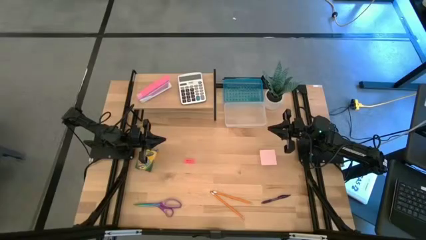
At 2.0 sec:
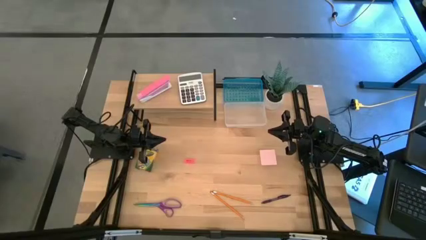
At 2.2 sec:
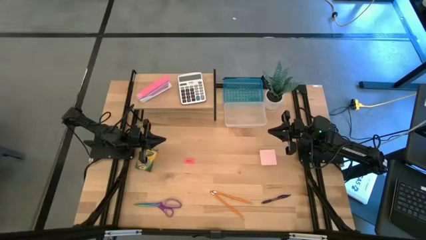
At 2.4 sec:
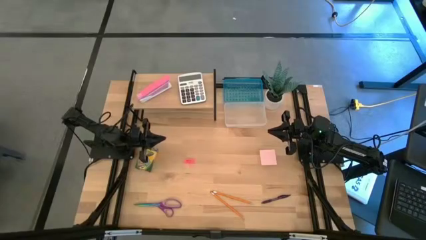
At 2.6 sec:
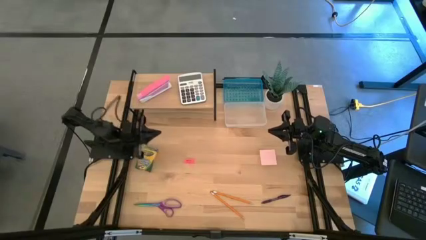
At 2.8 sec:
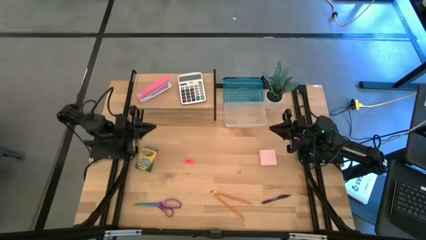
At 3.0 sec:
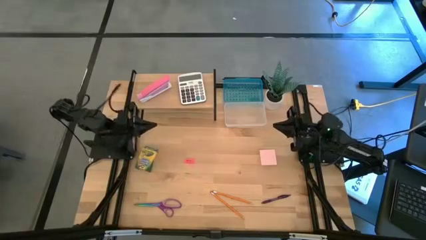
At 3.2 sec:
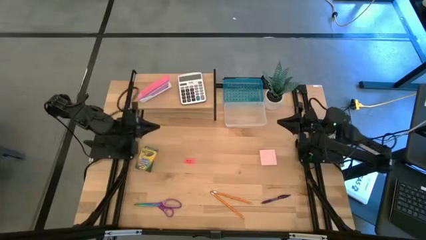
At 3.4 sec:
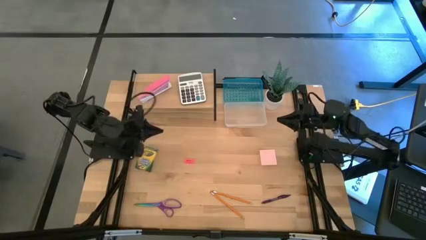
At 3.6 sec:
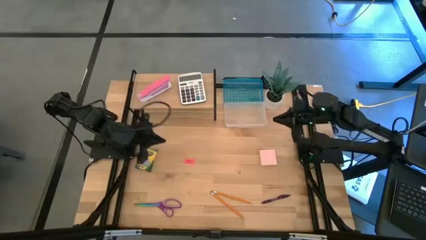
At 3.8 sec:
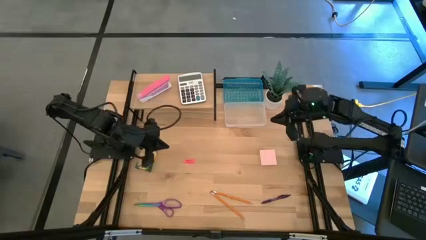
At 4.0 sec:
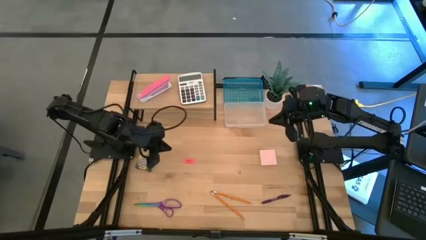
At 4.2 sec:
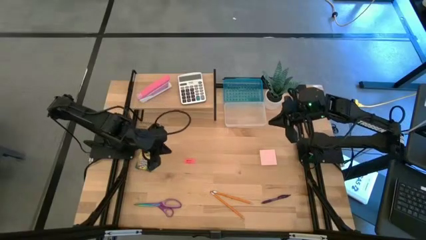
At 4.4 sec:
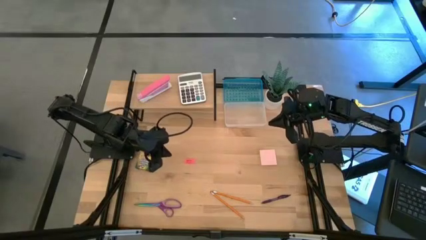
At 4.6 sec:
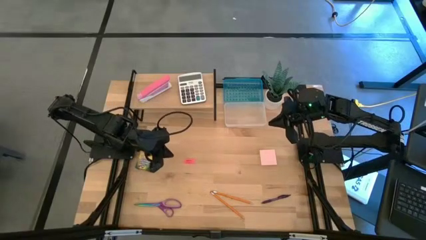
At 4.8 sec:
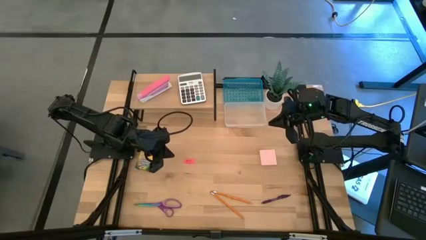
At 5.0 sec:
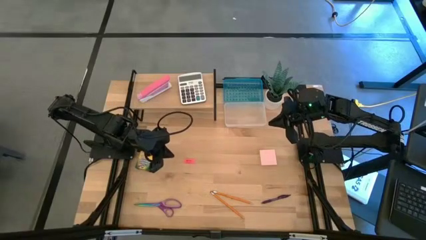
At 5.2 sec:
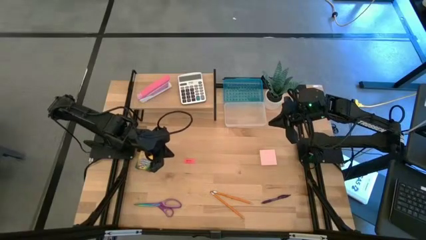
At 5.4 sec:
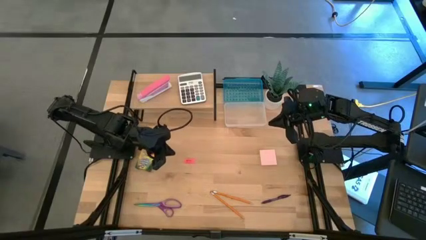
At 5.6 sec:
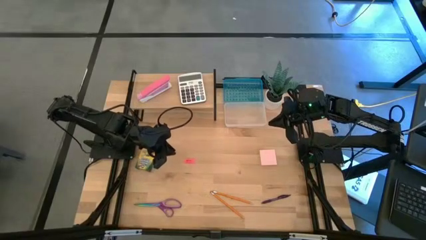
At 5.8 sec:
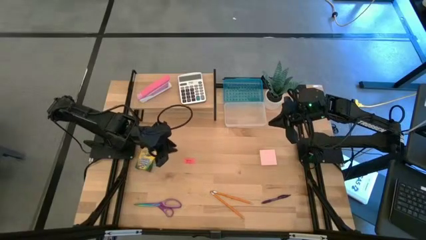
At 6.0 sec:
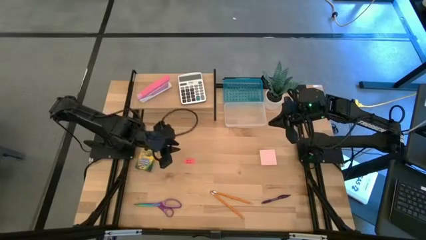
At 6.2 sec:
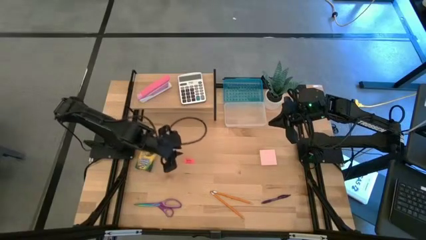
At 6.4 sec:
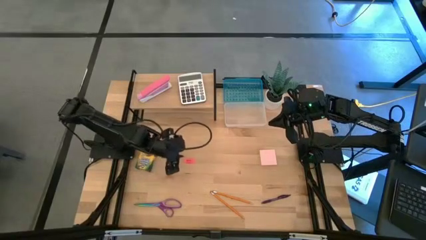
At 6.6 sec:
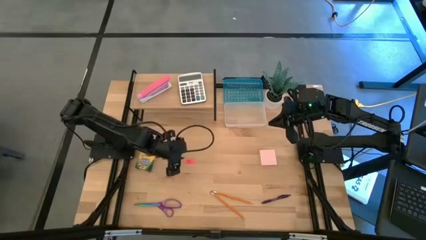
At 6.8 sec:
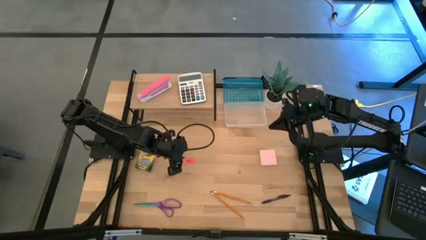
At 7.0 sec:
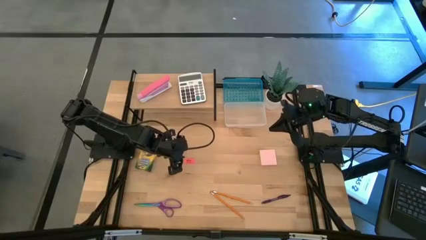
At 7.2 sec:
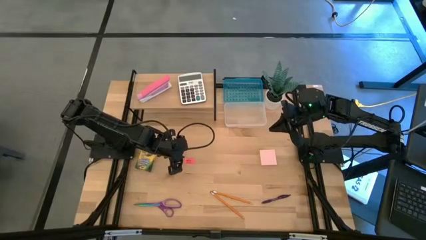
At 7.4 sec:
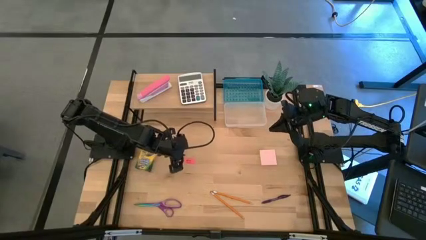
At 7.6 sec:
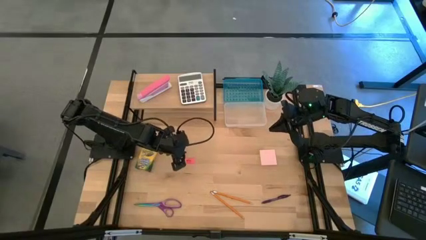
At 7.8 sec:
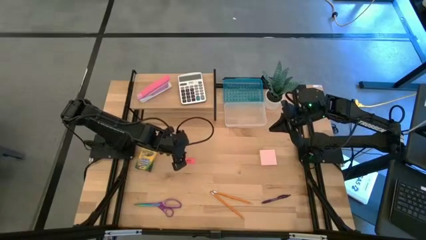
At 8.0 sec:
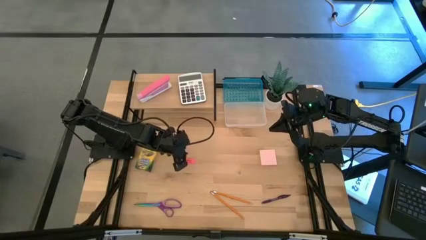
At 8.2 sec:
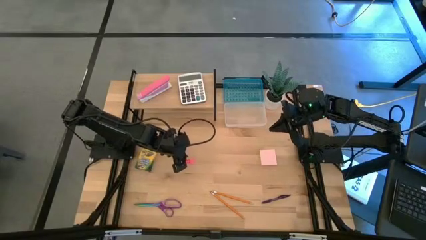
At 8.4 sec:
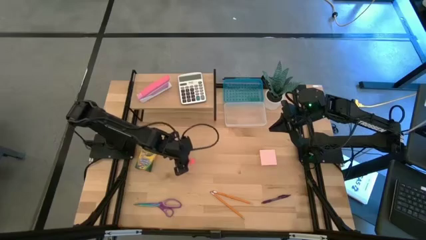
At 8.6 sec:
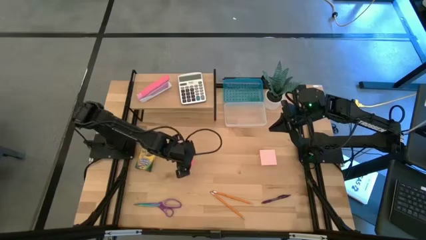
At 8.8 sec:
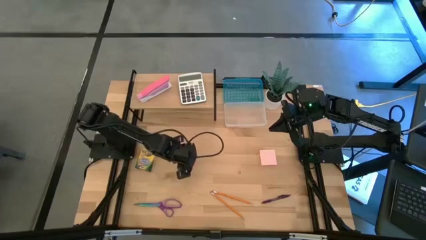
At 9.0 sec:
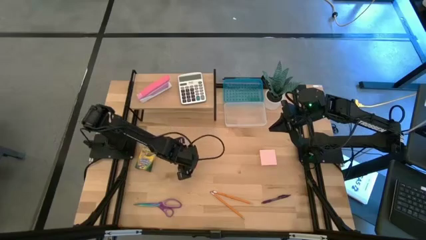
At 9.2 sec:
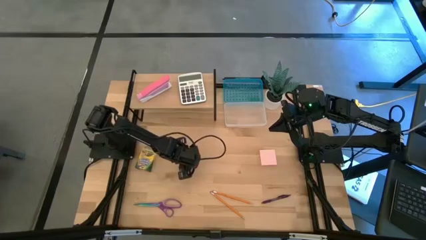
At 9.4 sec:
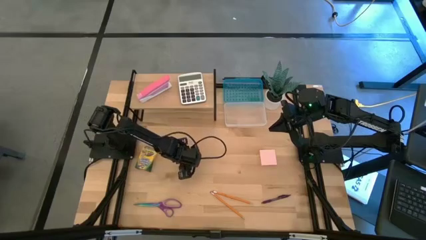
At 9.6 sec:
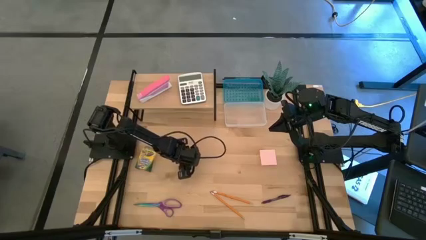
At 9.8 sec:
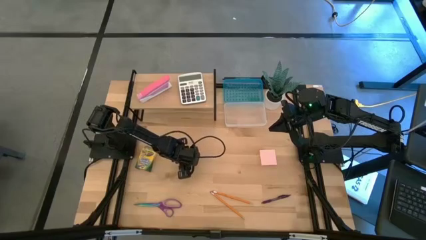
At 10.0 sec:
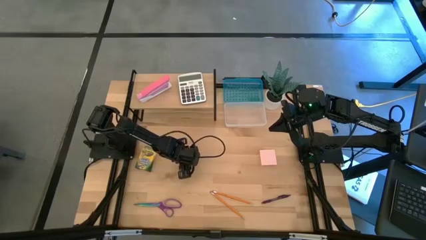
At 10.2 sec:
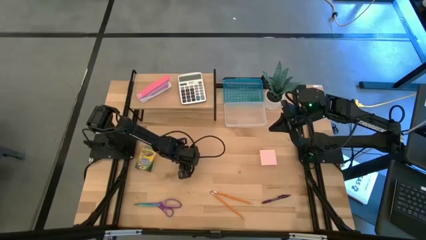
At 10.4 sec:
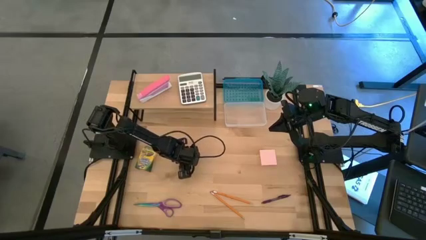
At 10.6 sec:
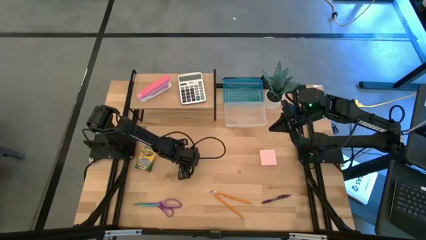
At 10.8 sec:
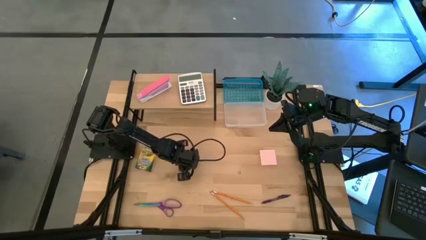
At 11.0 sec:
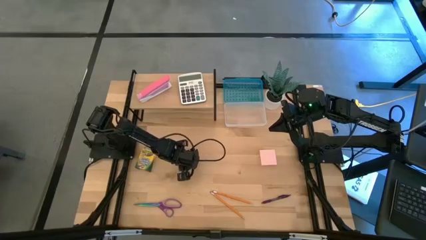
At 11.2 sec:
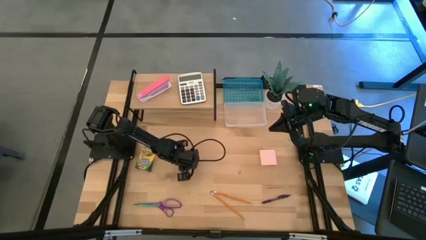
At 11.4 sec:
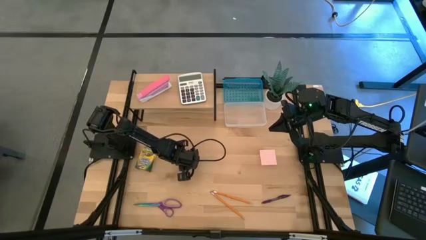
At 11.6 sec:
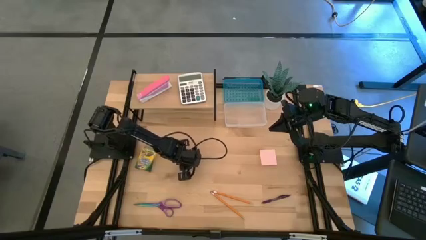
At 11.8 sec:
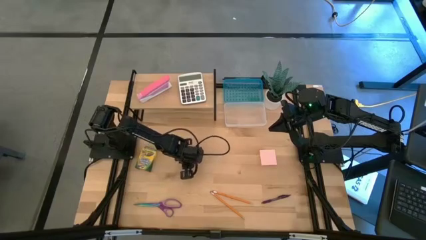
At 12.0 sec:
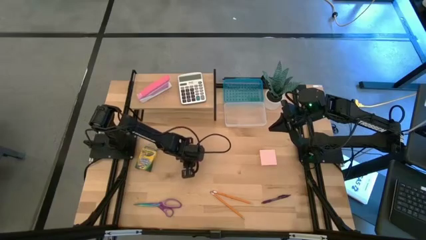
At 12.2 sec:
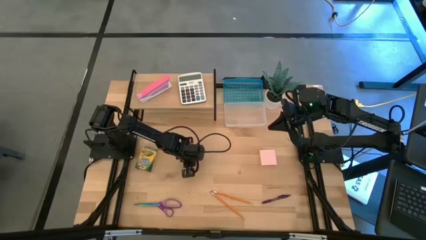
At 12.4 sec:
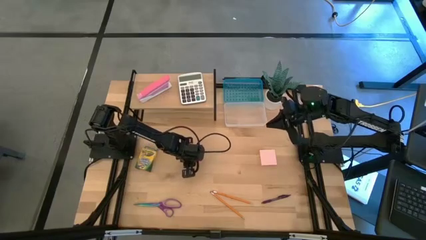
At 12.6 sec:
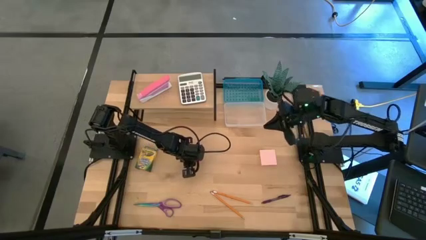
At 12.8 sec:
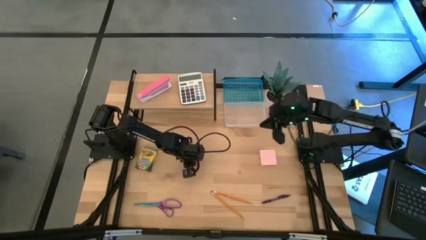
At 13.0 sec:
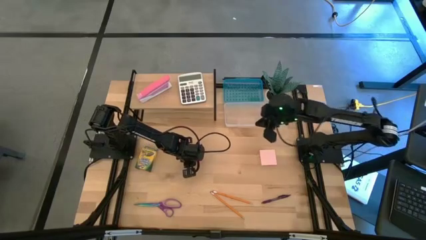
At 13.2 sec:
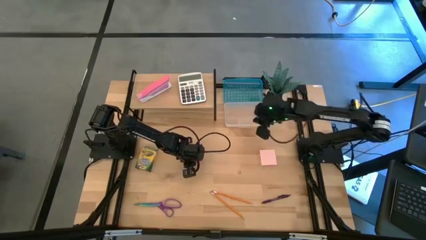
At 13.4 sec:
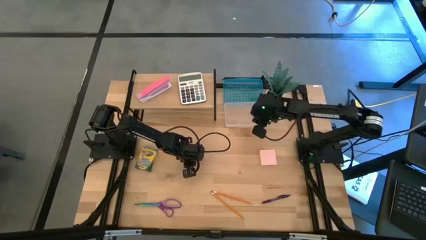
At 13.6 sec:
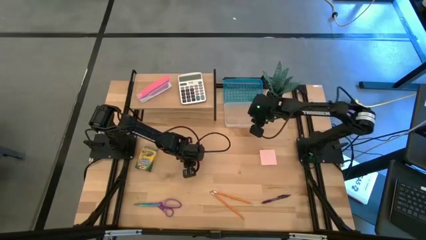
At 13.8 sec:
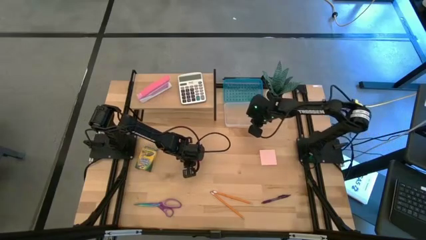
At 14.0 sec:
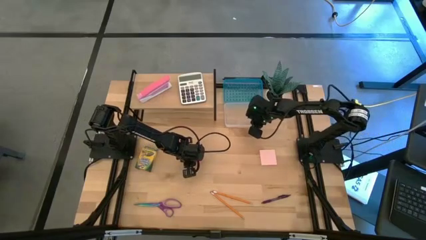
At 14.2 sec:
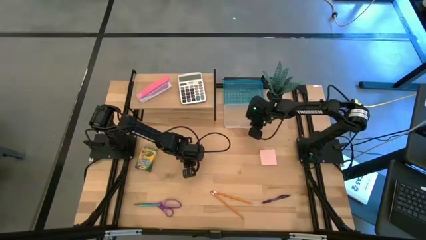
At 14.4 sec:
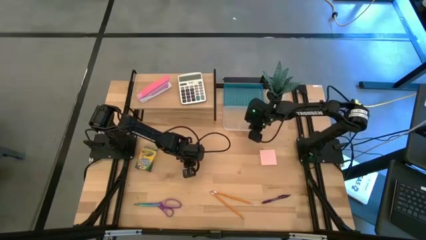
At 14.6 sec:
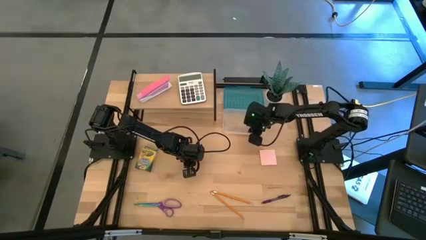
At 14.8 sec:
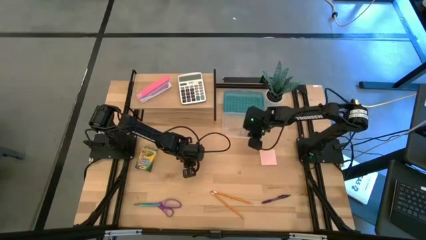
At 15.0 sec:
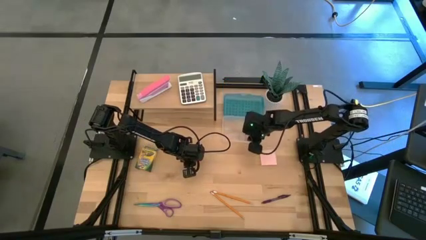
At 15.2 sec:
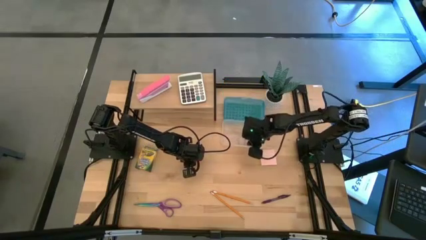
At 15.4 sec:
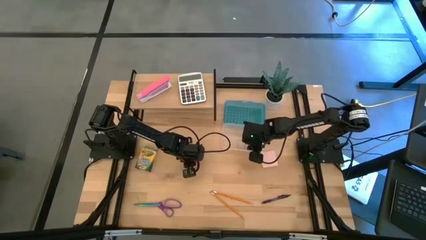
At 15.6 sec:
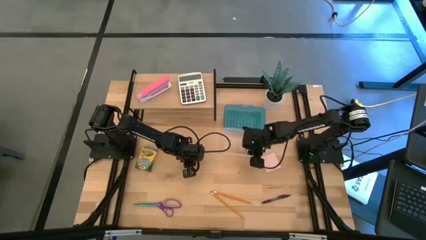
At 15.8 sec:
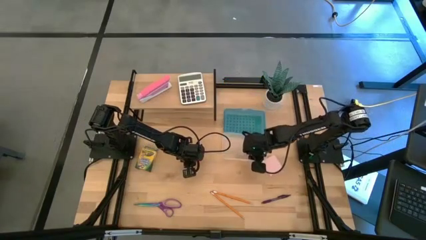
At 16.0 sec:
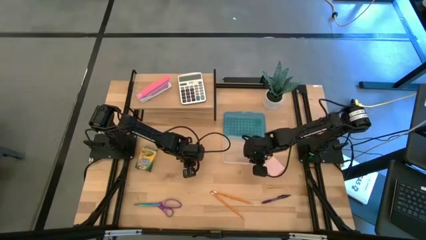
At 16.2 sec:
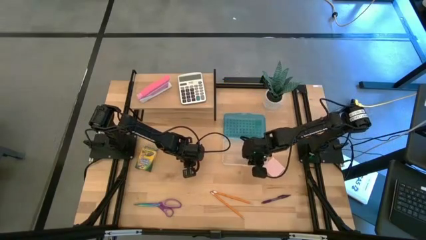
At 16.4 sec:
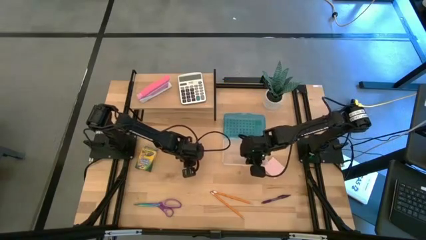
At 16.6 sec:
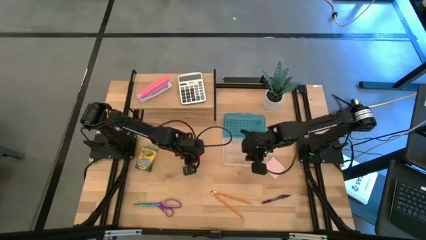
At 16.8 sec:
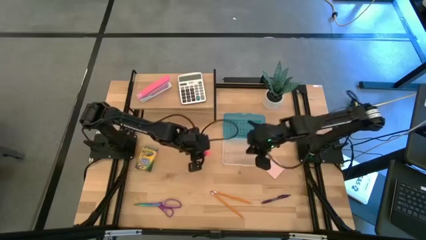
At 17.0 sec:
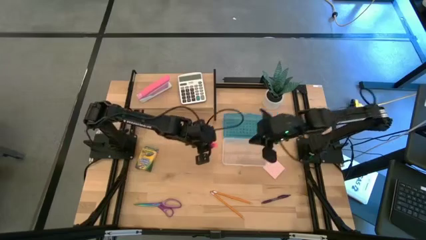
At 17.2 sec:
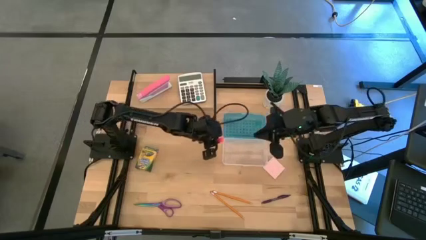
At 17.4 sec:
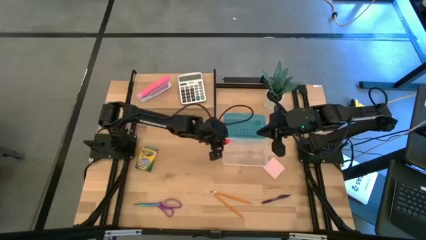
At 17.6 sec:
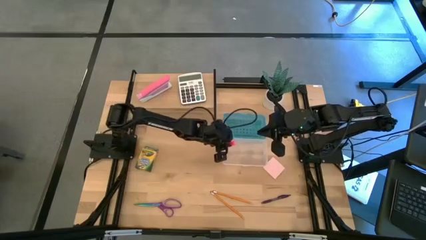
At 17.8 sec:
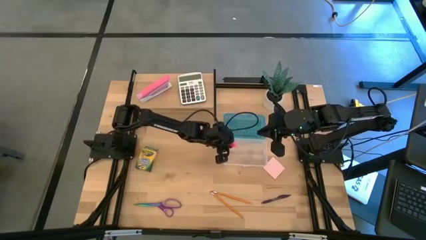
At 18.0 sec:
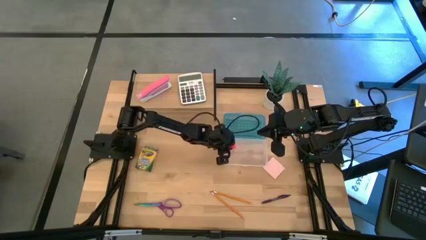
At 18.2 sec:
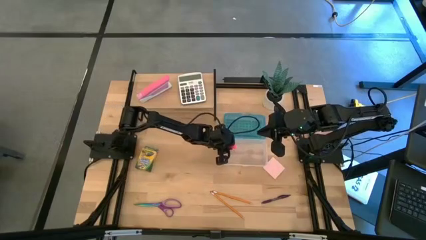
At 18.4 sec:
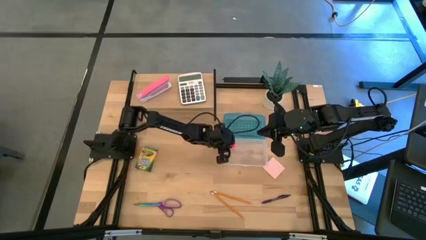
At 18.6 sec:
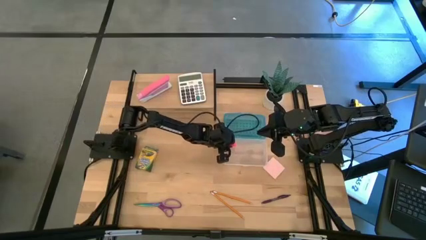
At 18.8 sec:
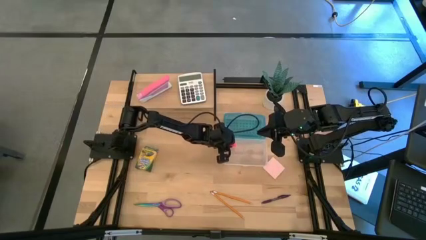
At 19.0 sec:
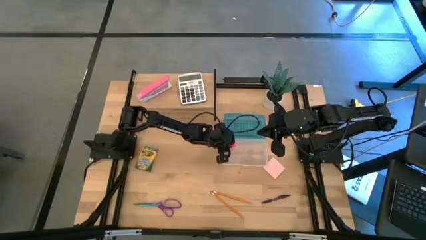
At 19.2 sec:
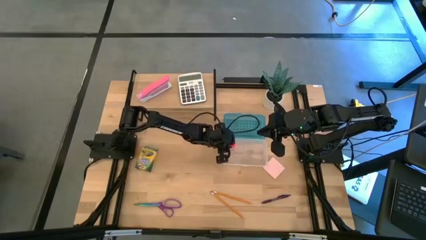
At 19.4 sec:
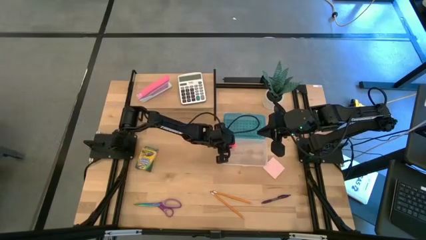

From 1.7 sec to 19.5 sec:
Task: Pack school essentials
Put the eraser into the supply box
